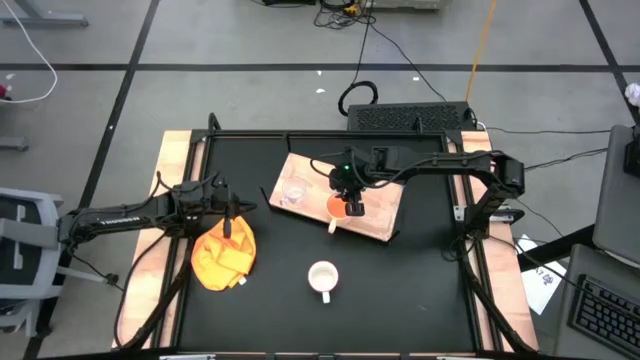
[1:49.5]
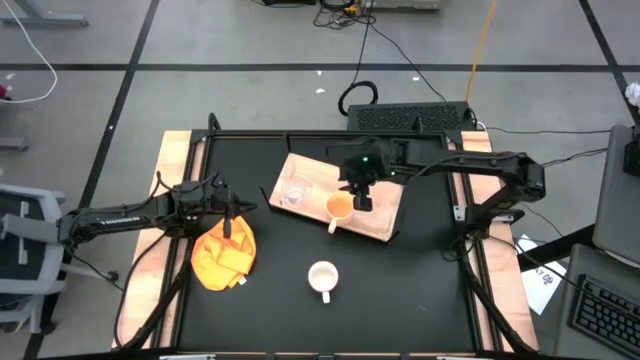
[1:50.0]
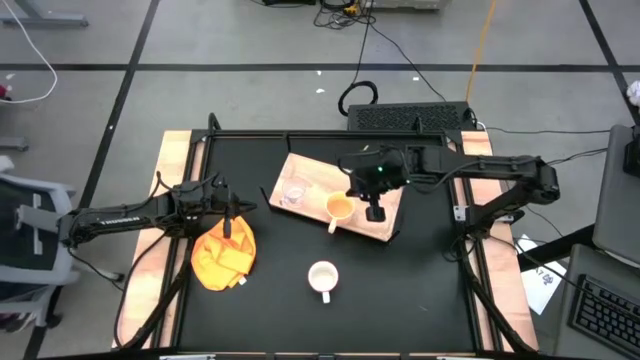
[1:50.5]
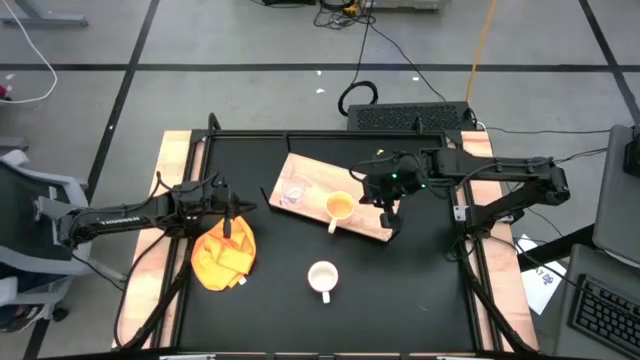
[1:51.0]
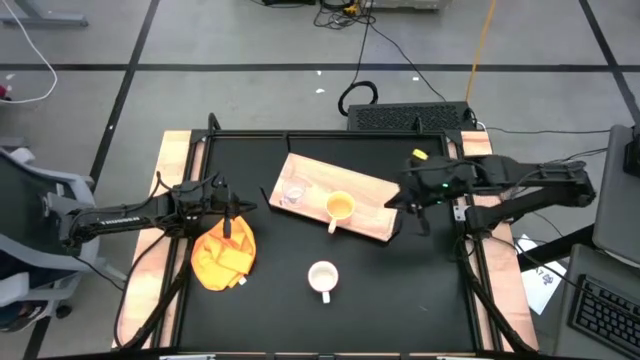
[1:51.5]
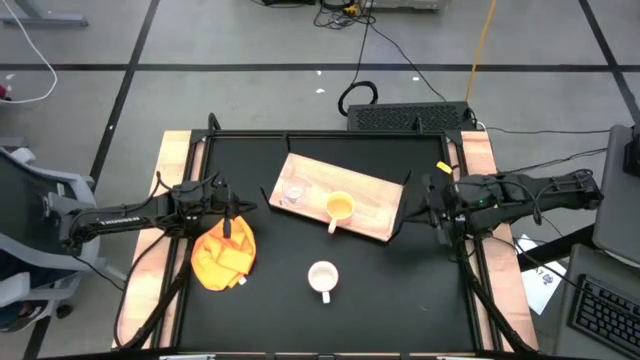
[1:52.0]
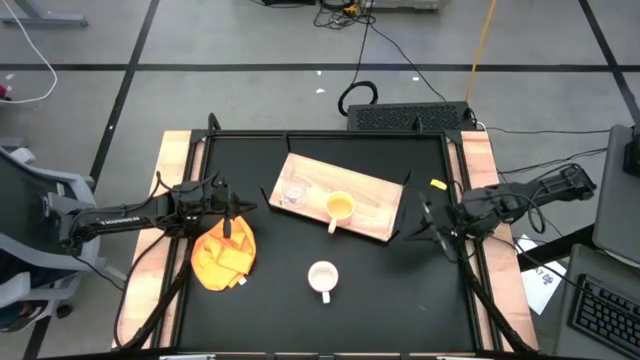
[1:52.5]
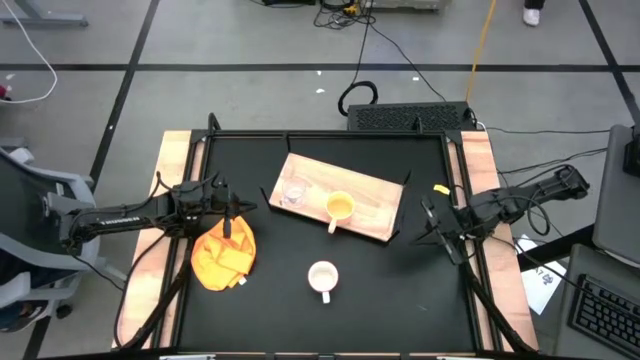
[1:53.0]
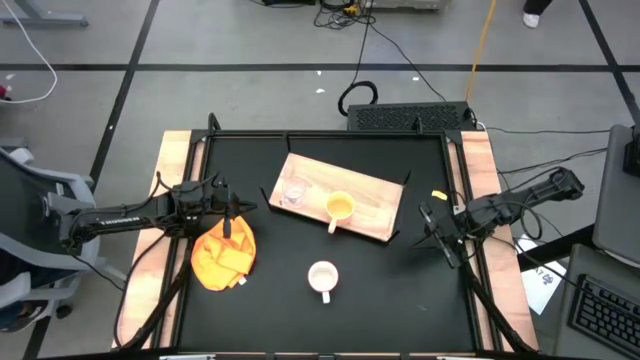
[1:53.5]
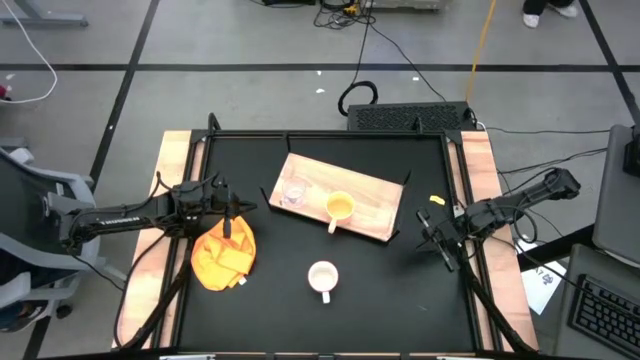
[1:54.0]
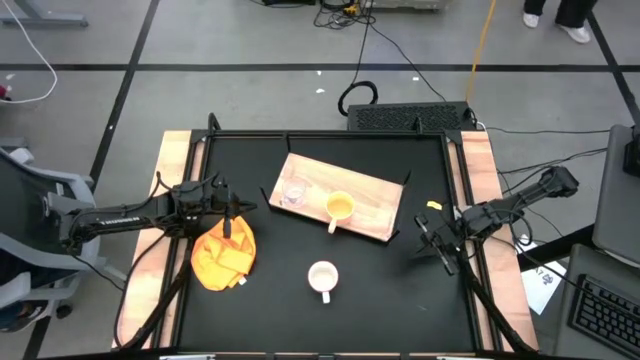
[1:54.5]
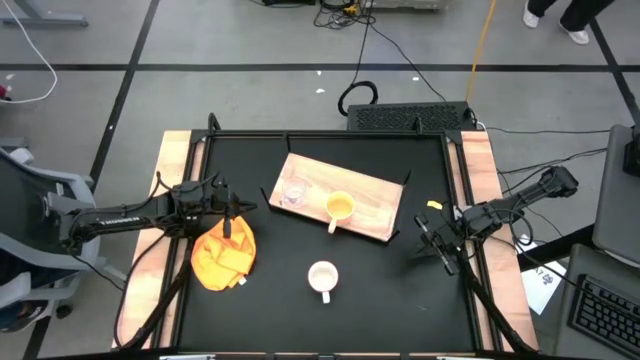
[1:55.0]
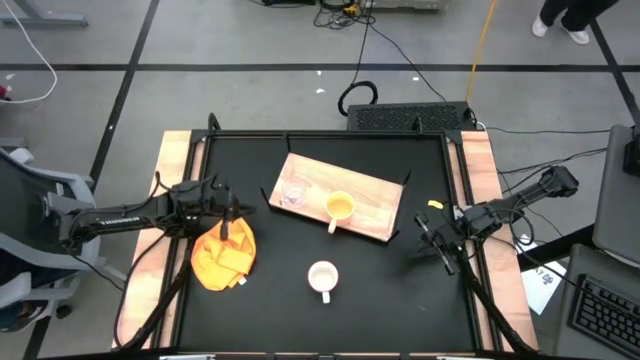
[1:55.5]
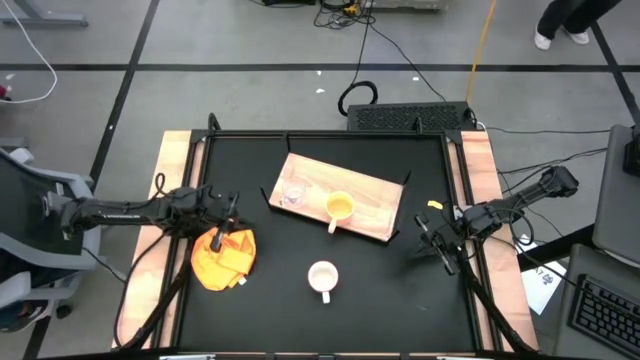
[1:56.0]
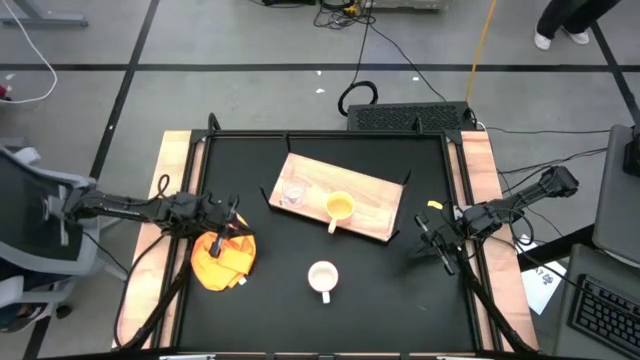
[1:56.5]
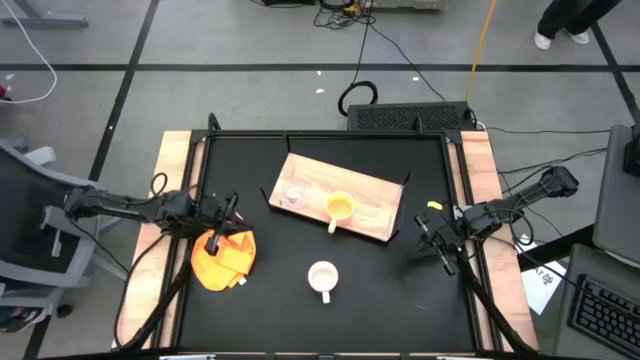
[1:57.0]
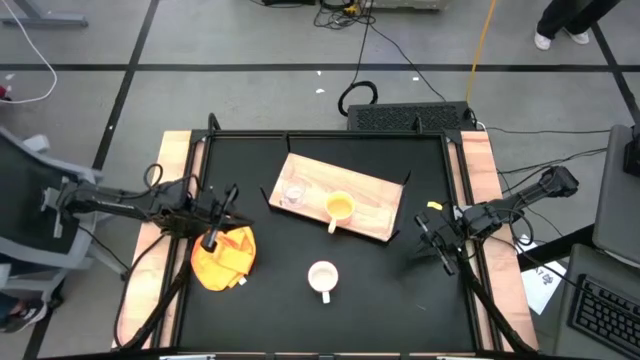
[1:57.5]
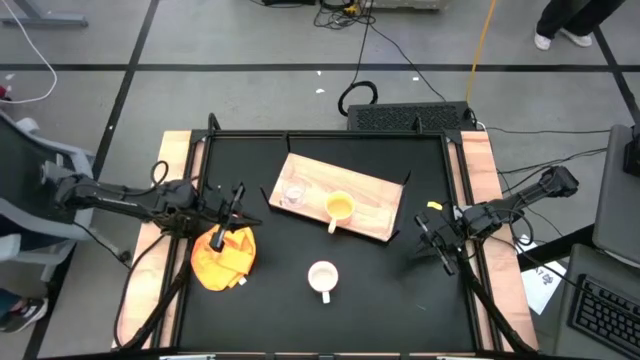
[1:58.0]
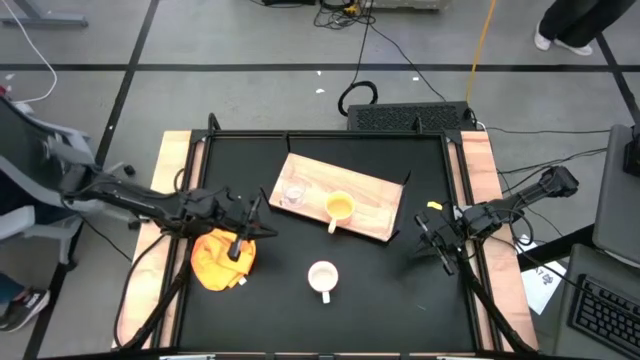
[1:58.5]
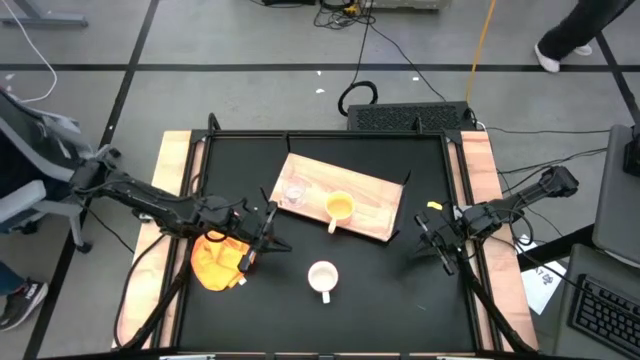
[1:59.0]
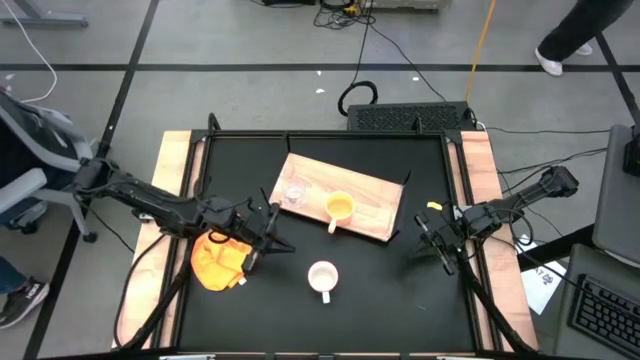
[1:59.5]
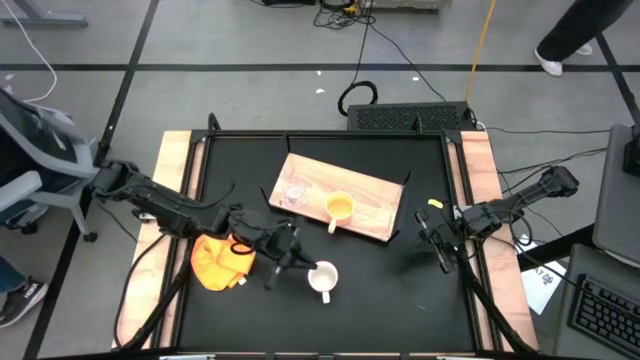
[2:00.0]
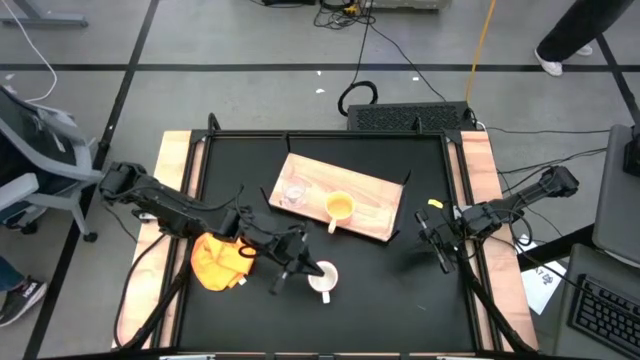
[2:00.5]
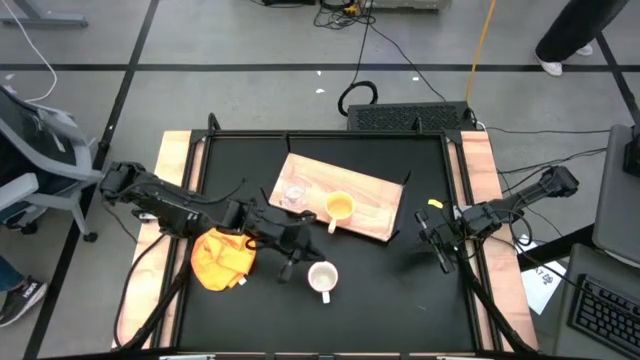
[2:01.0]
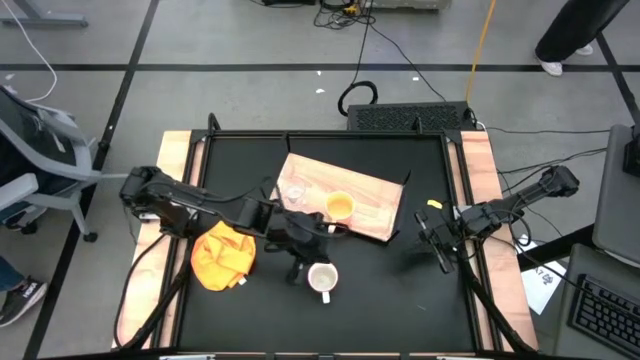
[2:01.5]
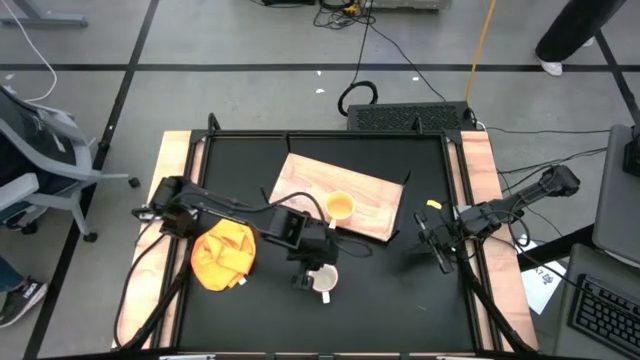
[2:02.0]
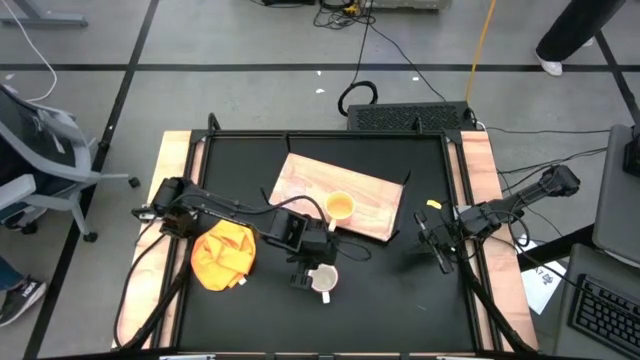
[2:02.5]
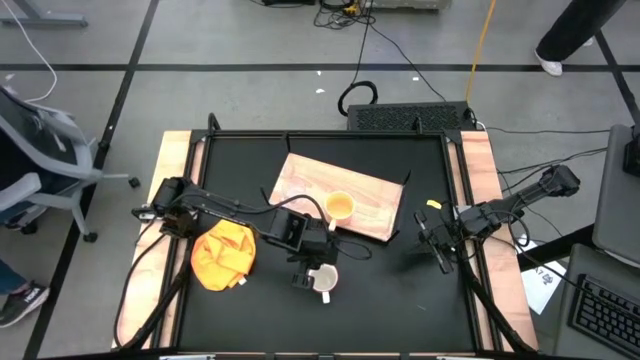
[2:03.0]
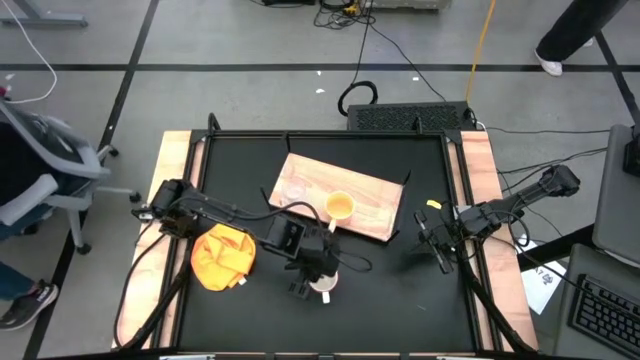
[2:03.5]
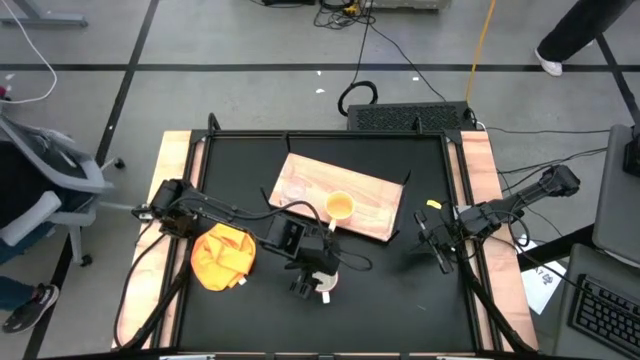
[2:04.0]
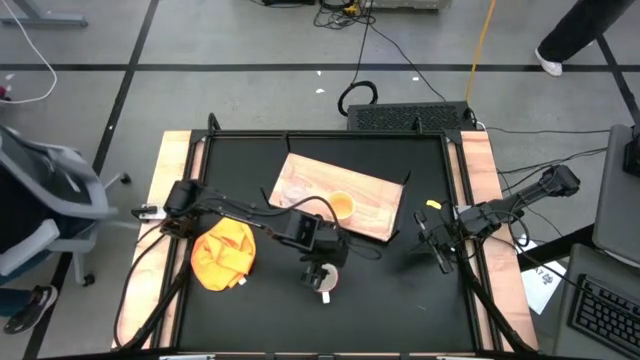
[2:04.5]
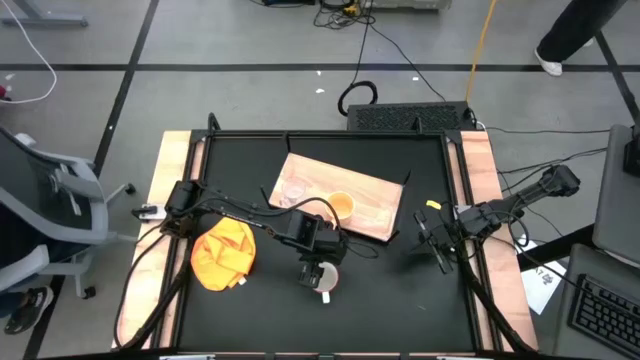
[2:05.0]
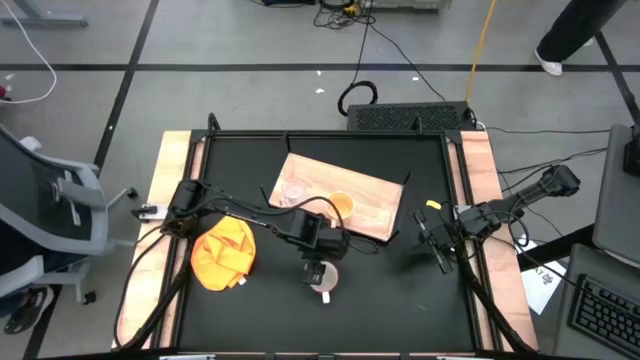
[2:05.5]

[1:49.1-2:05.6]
Task: Stack small to large cups/mugs on shelf
Put the gray patterned mug on the shelf
